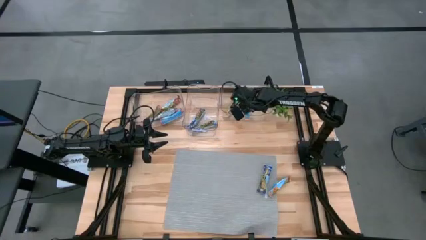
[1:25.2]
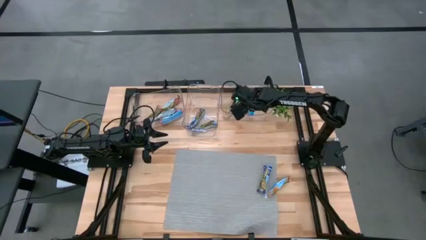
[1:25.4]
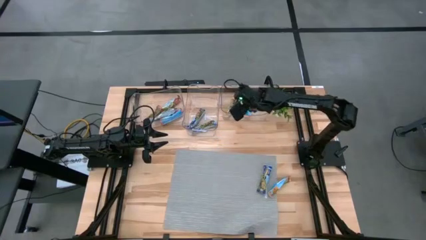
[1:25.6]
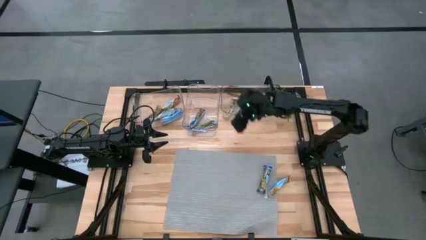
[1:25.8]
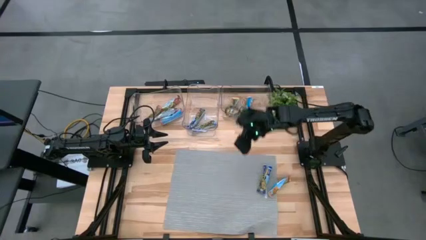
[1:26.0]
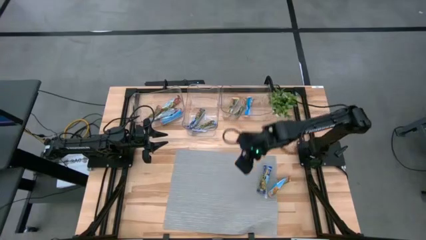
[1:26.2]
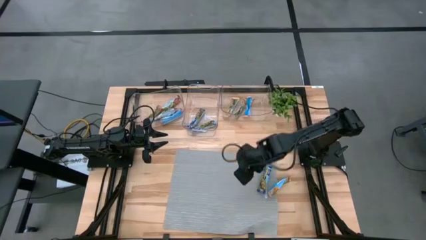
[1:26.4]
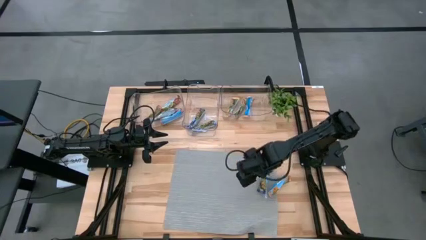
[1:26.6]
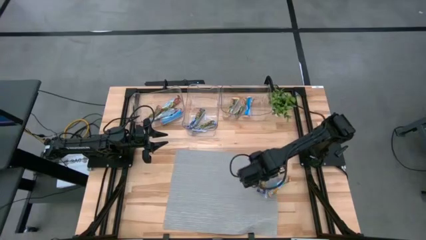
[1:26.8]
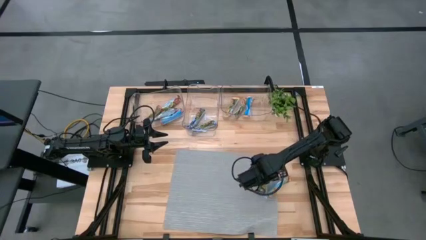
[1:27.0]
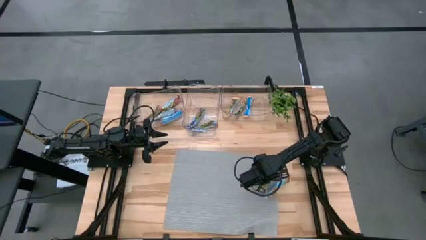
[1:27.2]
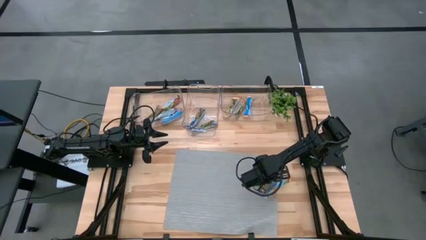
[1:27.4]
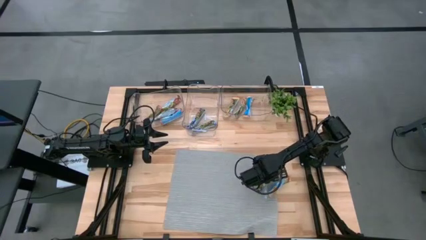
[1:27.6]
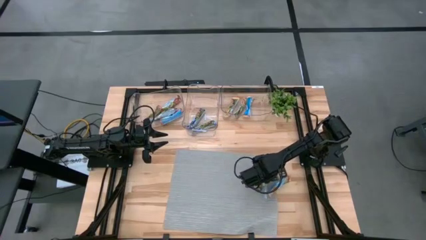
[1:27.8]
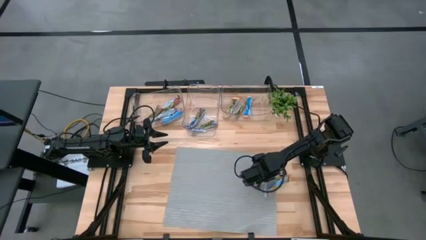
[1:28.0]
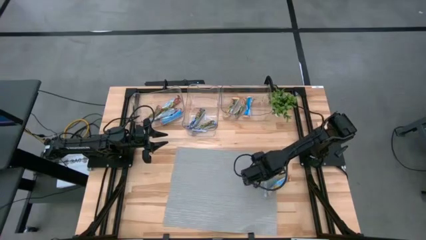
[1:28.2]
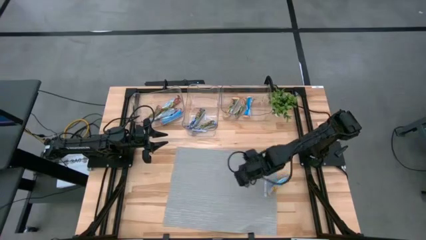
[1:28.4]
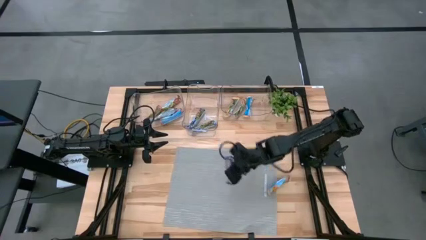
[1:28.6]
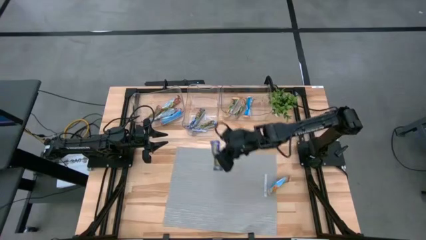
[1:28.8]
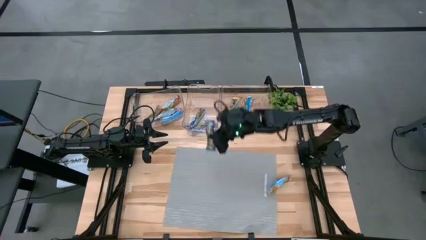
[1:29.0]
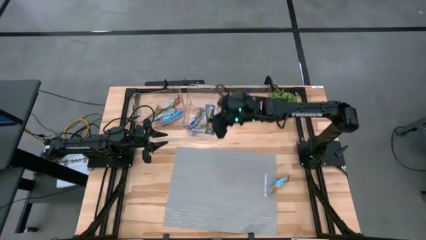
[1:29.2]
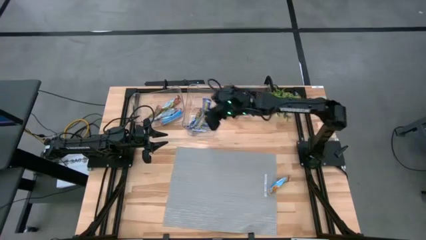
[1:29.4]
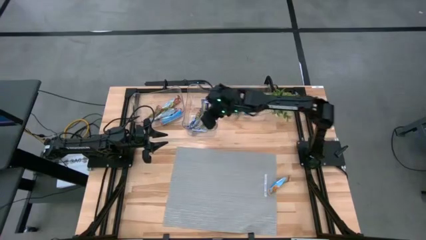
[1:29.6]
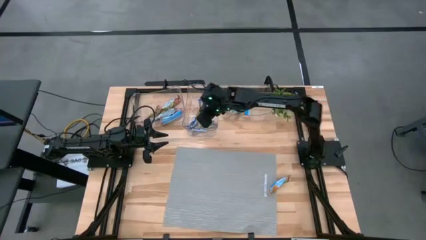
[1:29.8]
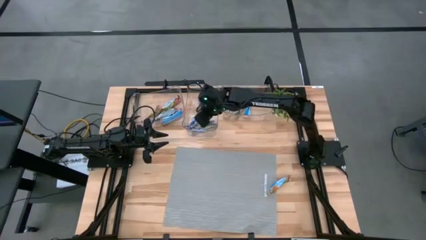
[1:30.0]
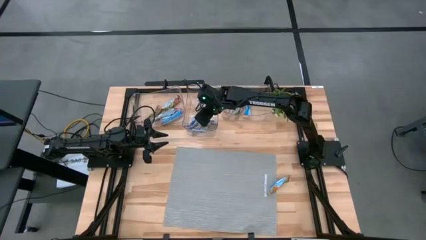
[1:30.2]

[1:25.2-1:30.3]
Task: Pick and place Granola Bars by type
Put the blue granola bar into the middle transparent bin

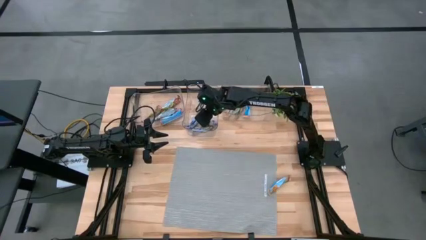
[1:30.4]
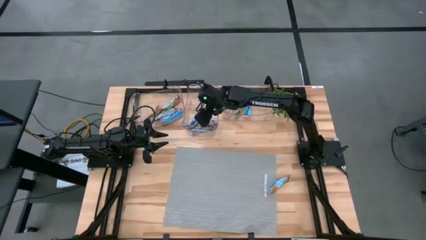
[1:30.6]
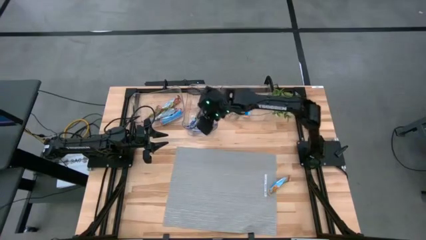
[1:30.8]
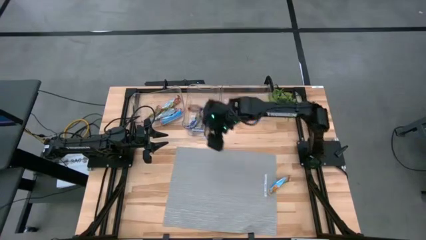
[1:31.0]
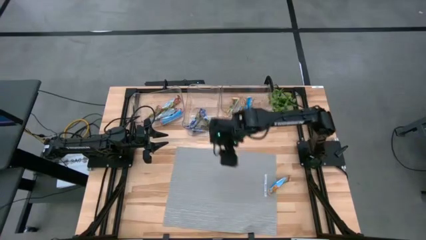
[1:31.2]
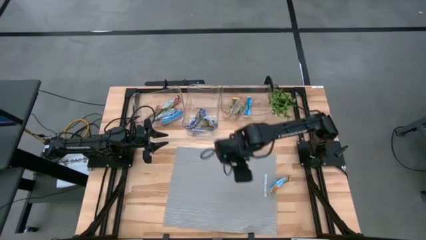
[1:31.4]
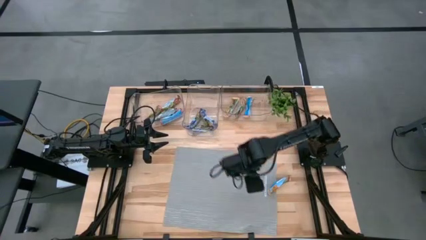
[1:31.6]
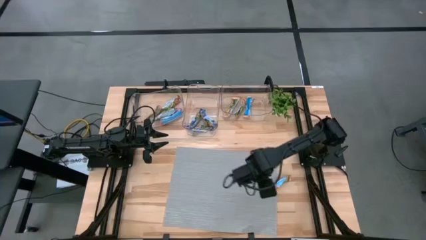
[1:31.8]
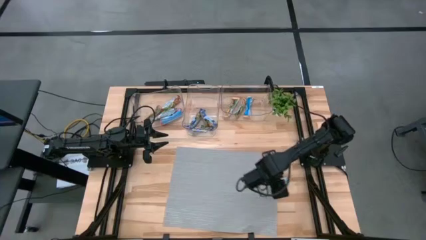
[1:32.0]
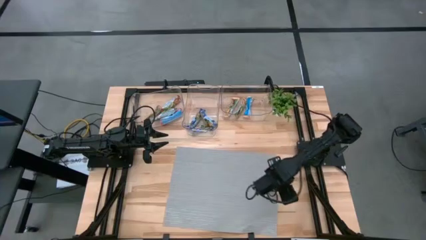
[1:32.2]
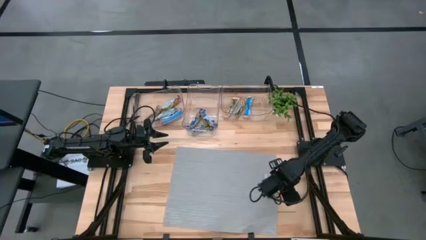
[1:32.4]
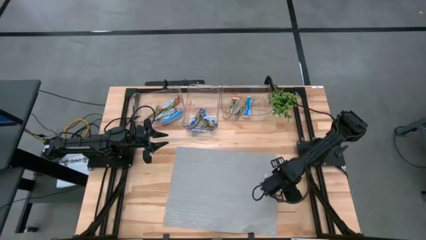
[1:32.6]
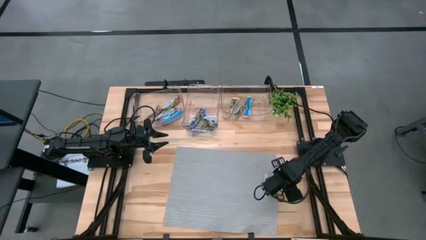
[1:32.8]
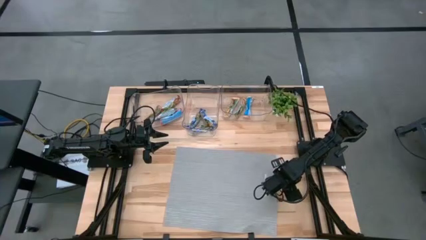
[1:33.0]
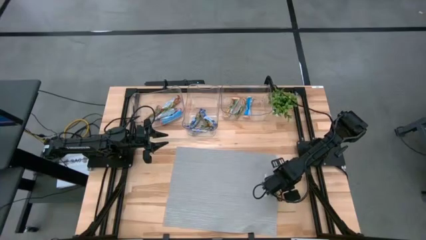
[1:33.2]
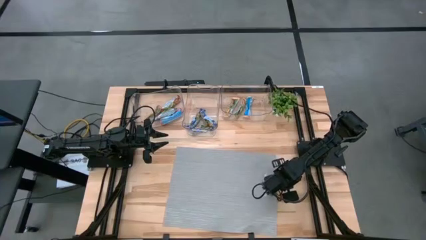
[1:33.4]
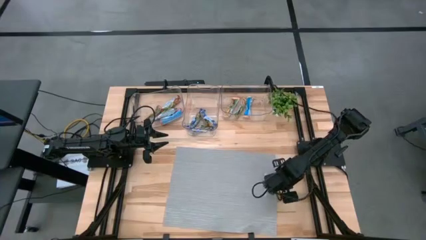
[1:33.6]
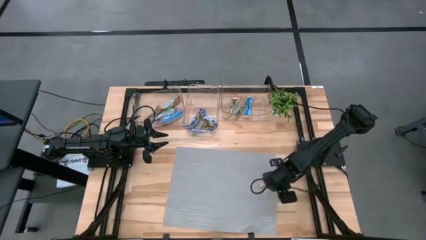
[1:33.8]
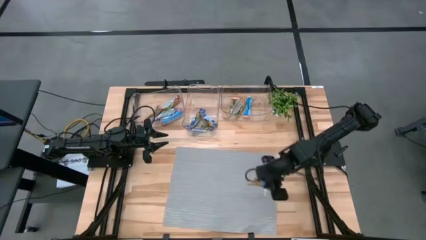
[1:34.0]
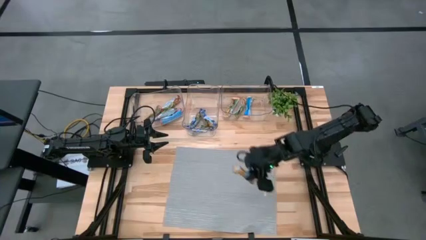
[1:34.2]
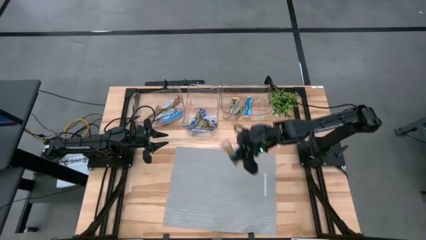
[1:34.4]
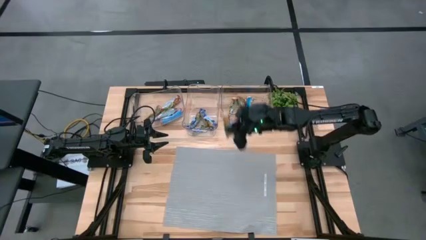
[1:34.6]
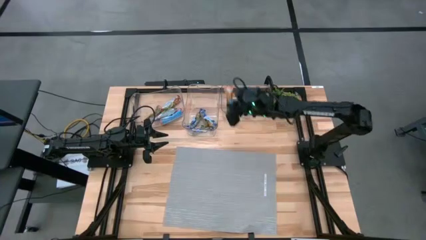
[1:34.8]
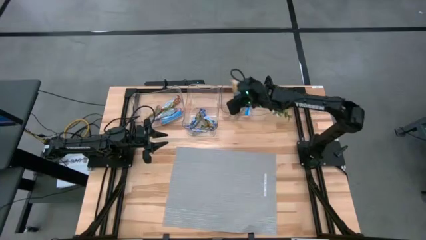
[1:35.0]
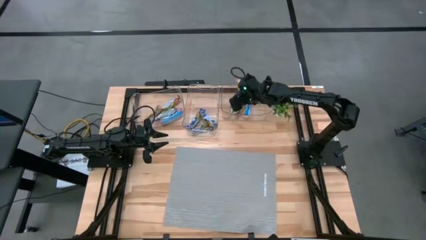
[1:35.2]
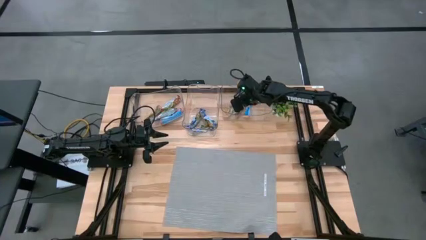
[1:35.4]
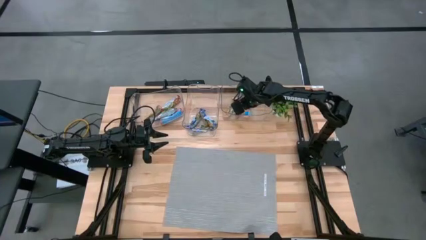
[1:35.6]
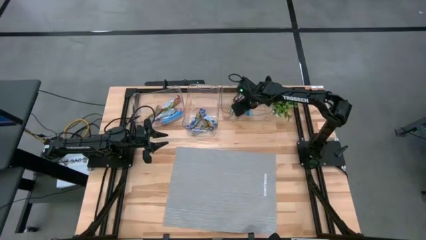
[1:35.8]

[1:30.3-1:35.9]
Put the yellow granola bar into the right transparent bin

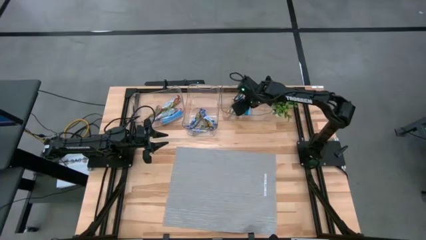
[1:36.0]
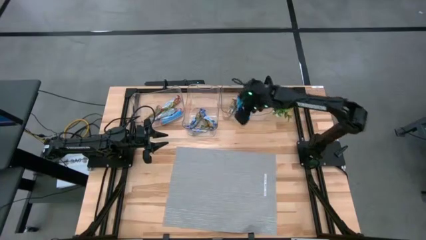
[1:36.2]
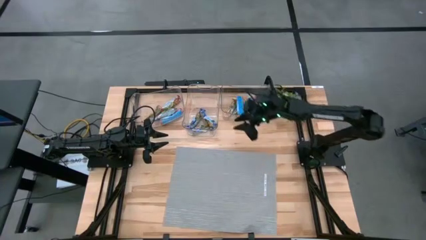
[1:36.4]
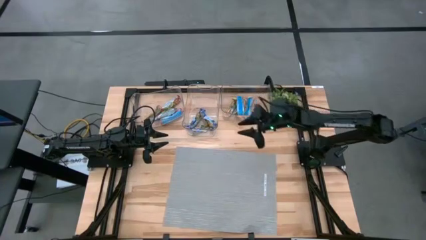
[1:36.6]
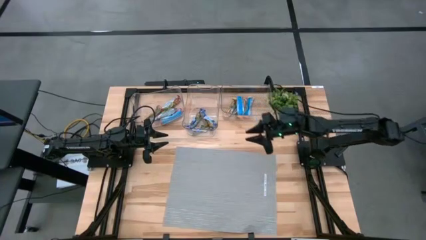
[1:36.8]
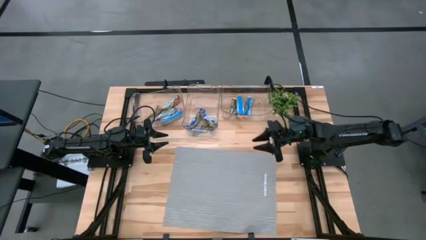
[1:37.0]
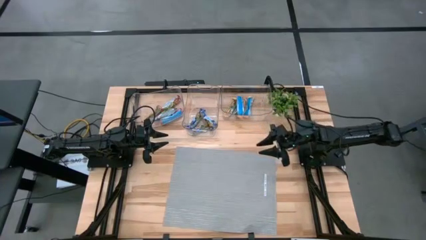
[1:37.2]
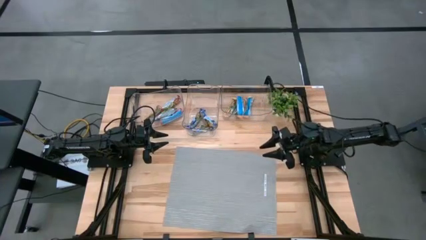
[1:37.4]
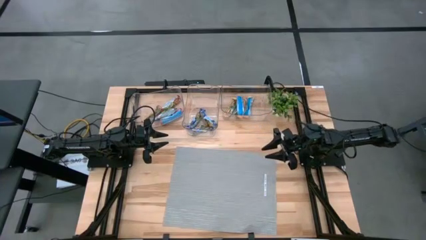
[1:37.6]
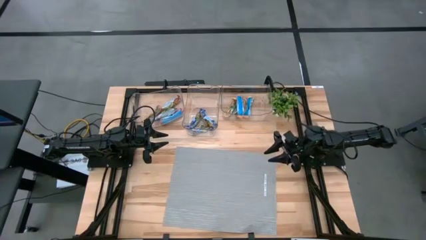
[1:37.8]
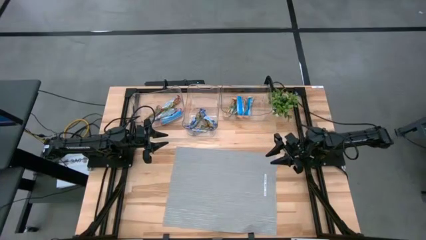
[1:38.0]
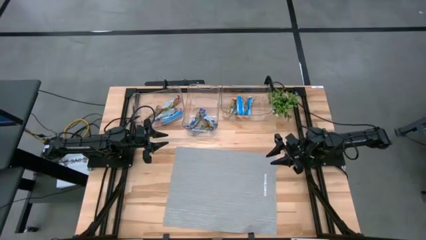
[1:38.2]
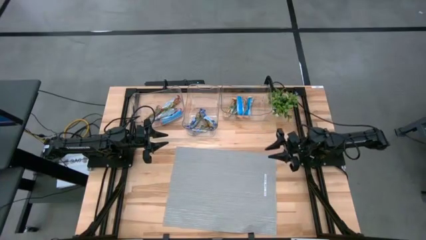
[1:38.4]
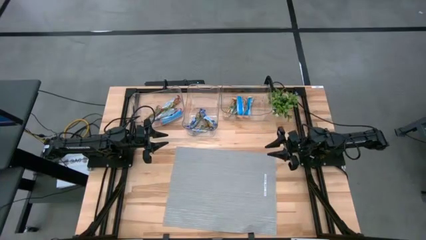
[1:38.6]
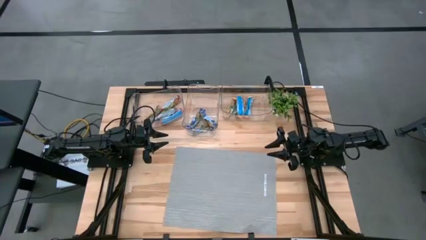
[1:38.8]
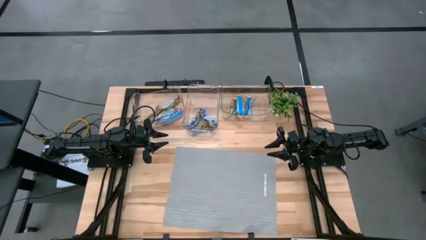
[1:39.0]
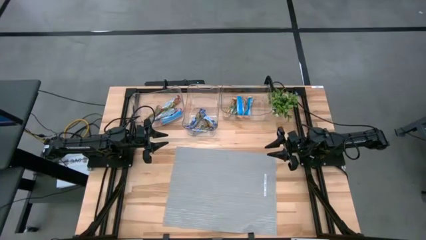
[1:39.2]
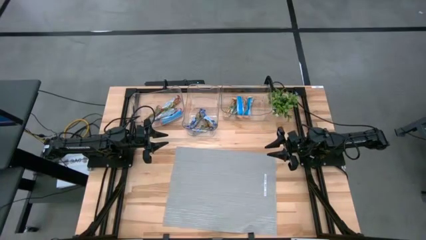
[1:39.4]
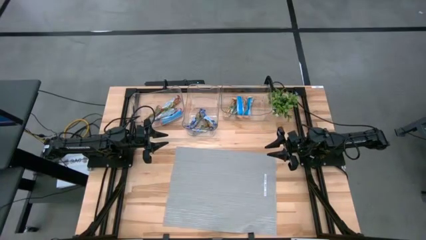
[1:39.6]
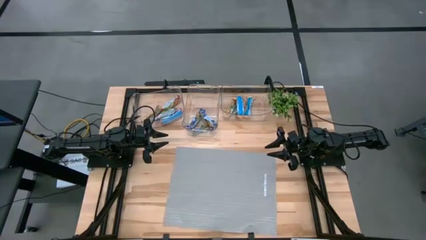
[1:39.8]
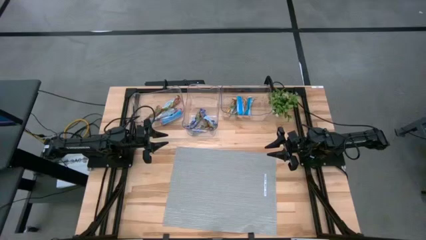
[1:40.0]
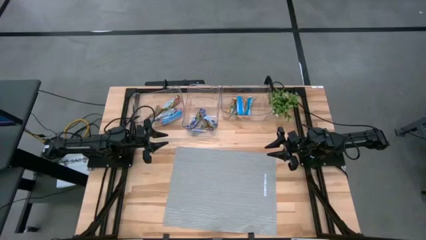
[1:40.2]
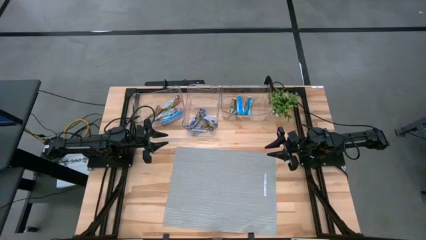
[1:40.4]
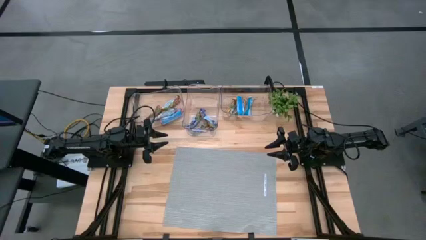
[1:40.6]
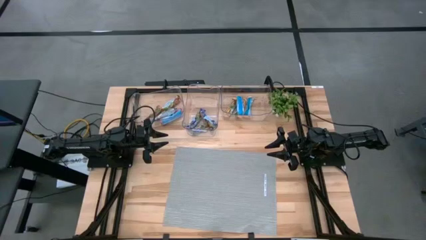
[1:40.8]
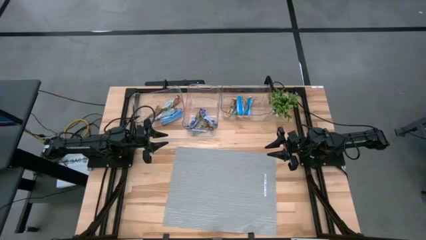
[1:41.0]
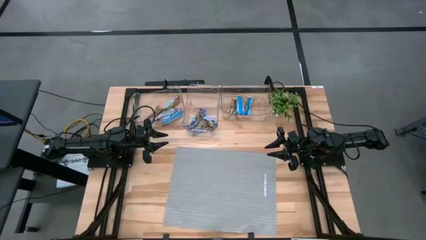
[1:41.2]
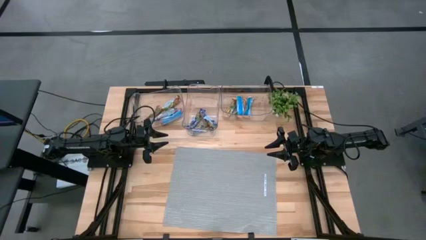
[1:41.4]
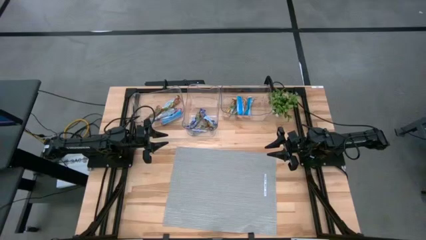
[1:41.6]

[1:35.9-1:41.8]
Return to Home Position
